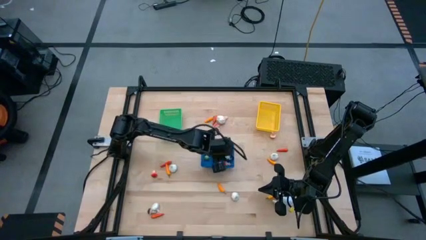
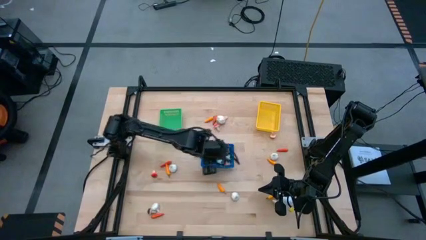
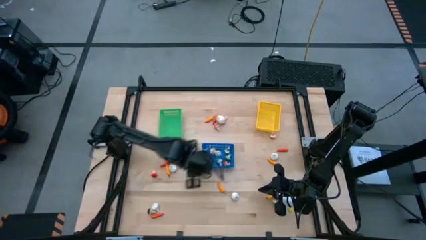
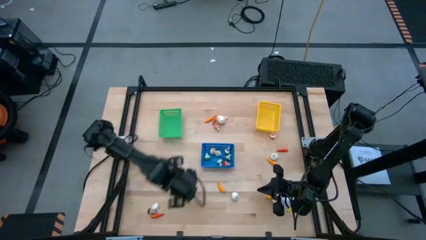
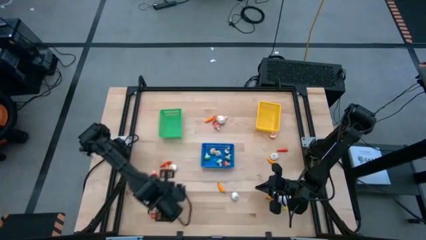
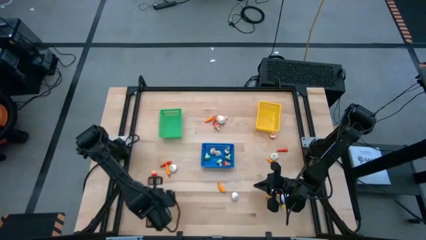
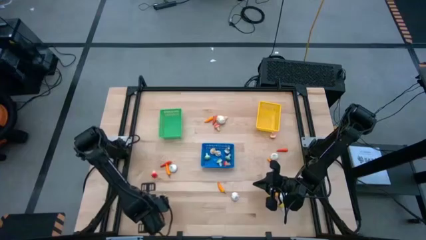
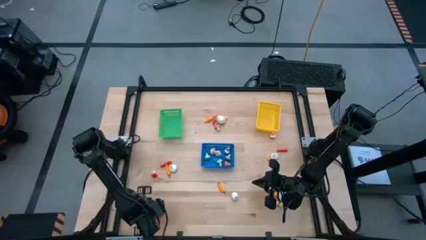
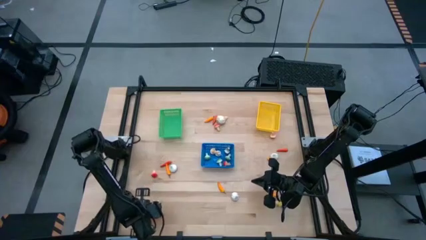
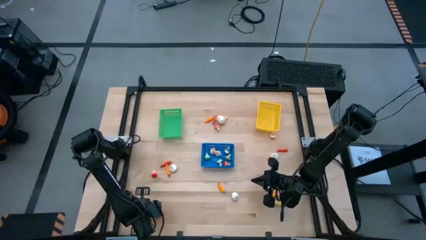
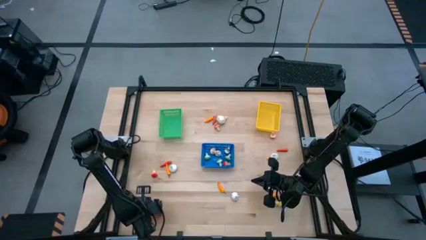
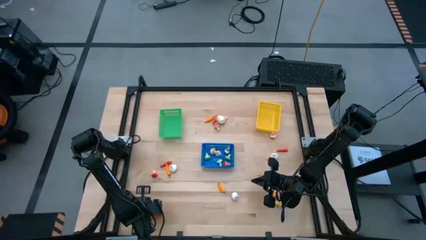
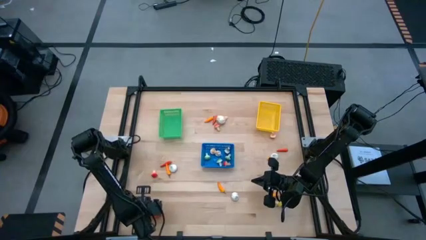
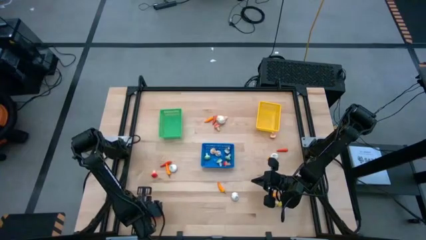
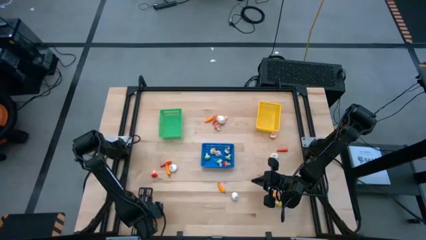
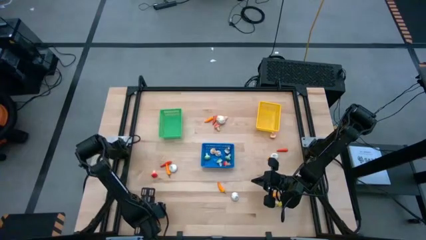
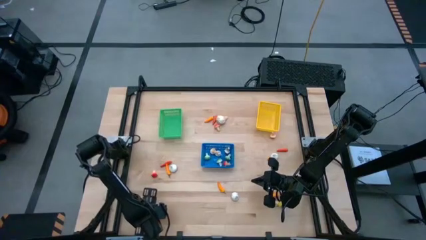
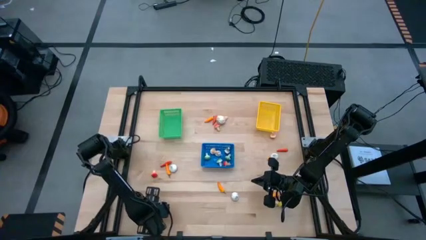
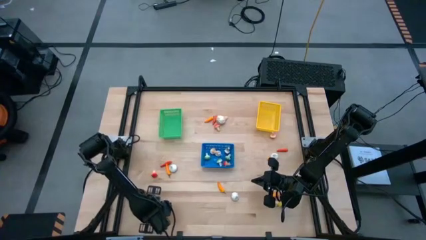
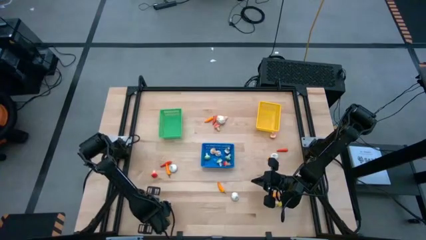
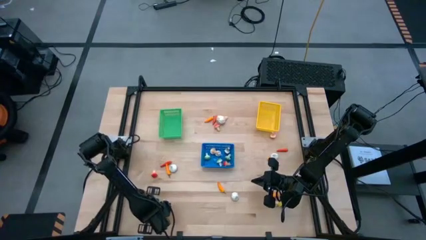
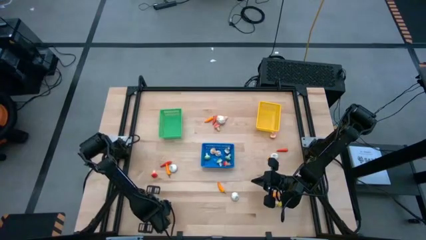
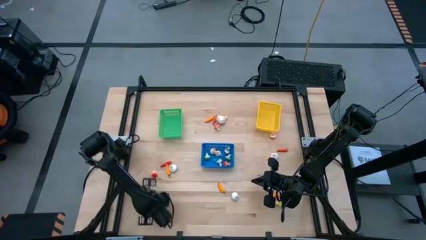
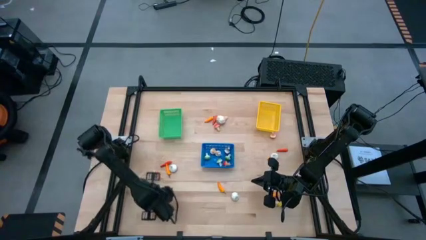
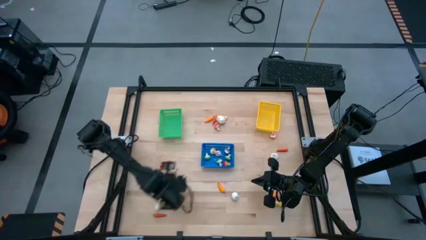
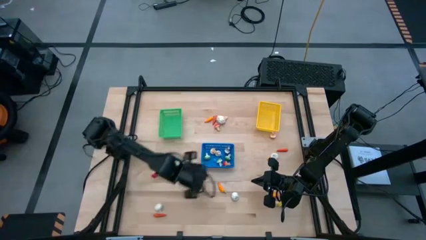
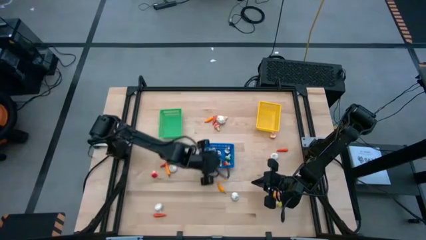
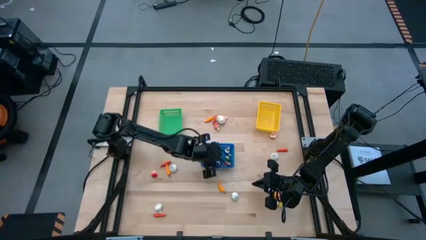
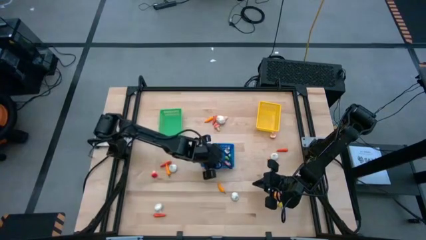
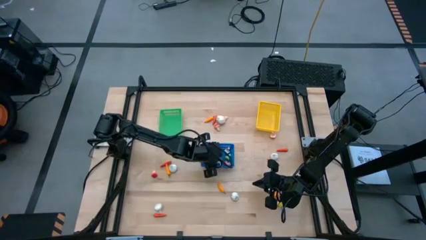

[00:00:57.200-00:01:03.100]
Task: Sort produce into baskets
Put the brown mushroom into the blue bin

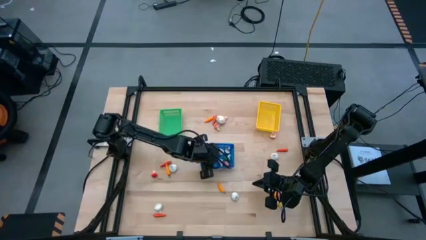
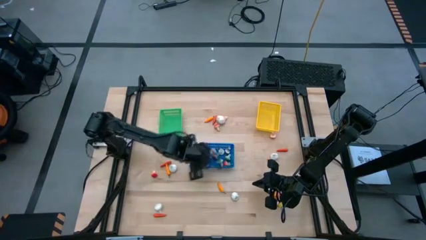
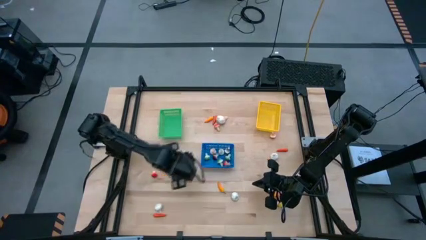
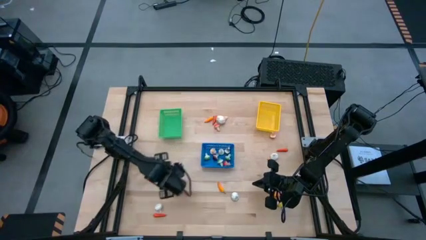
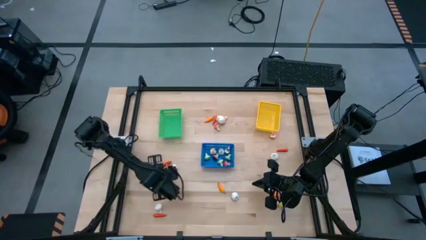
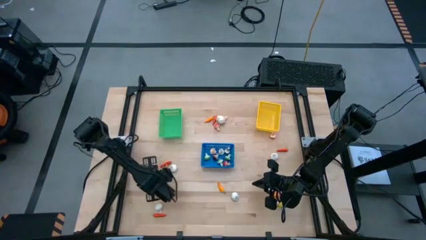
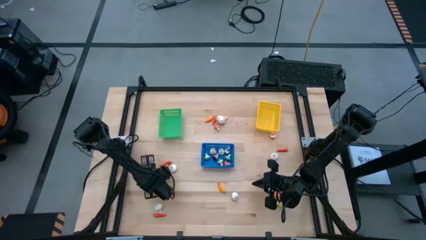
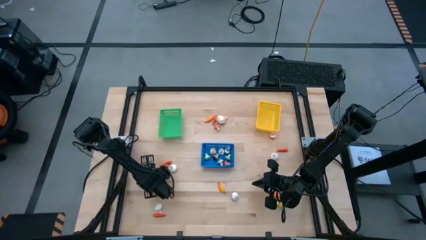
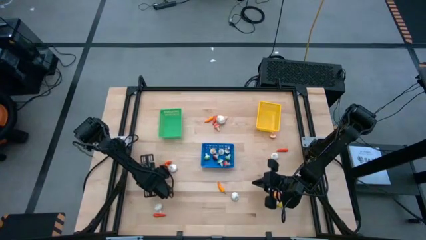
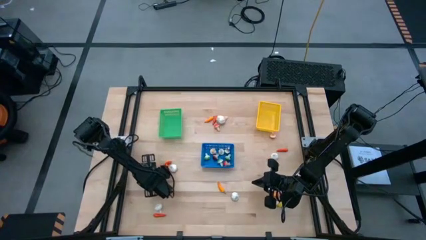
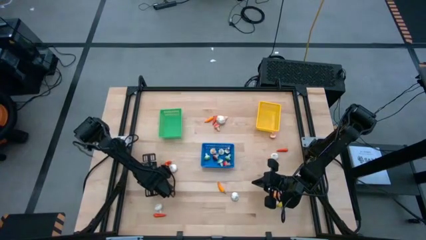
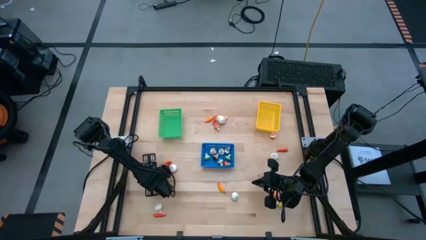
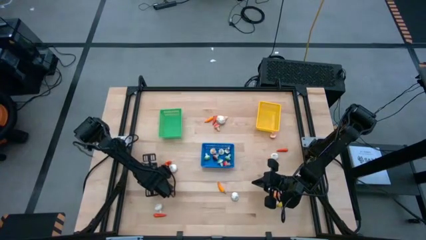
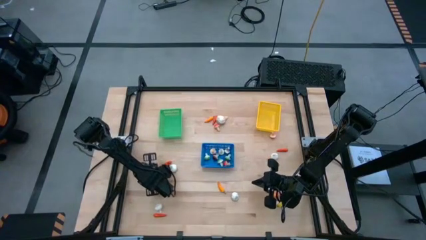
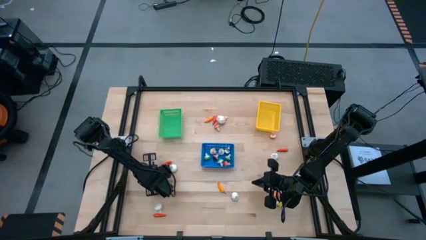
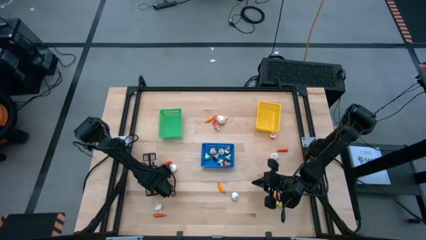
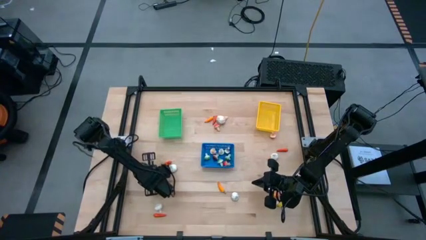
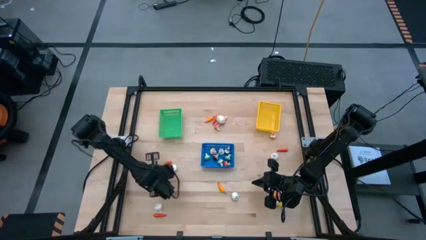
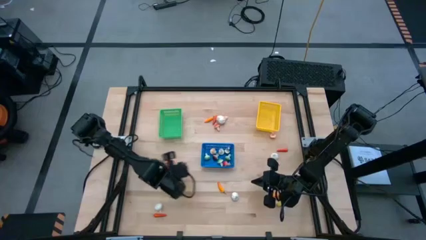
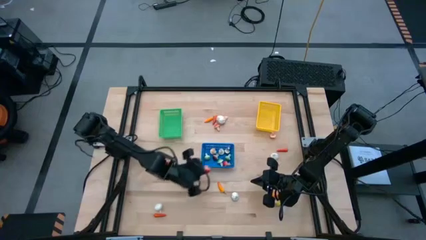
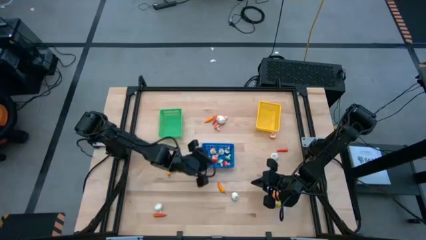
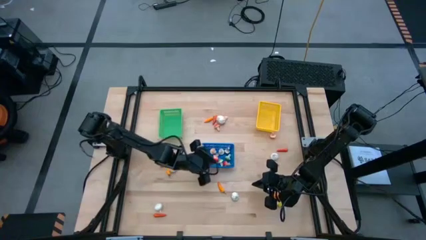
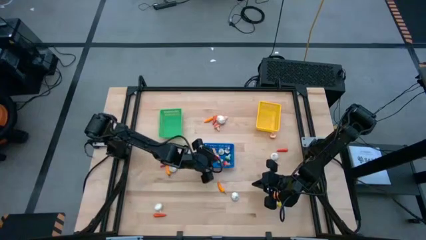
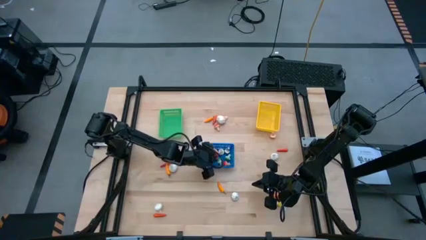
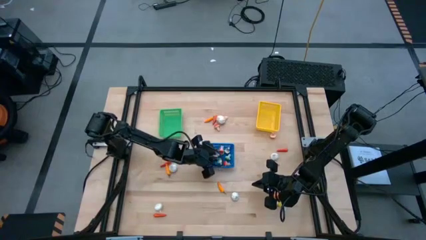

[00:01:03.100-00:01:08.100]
Put the orange mushroom into the blue bin

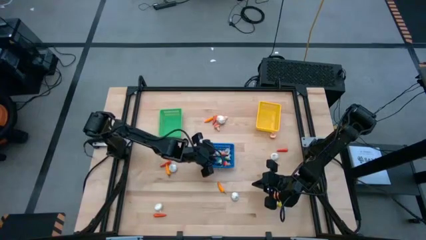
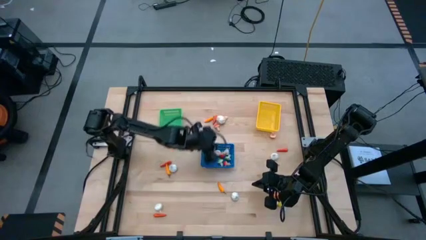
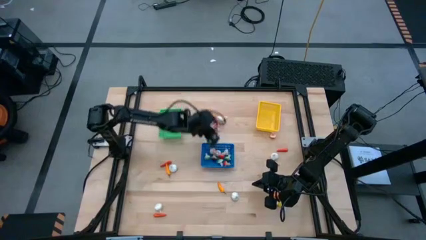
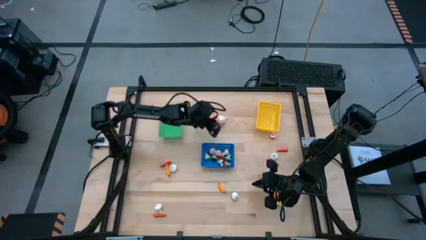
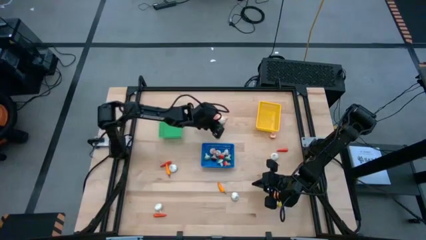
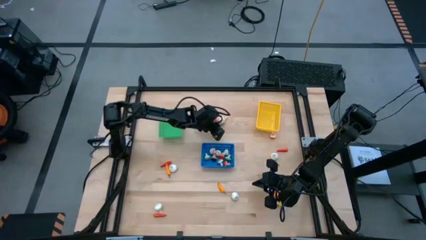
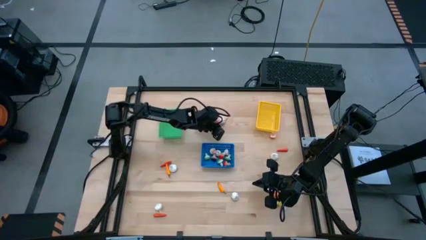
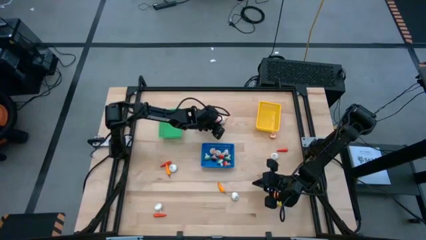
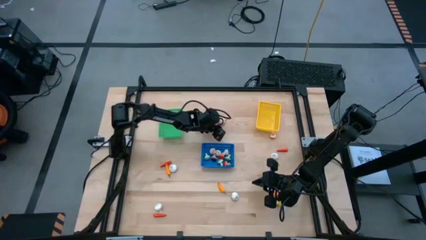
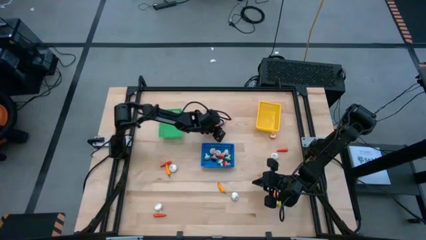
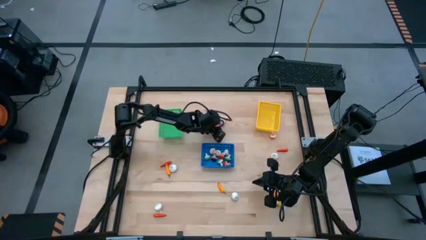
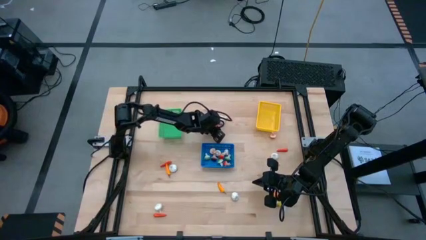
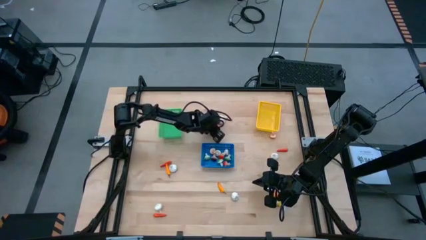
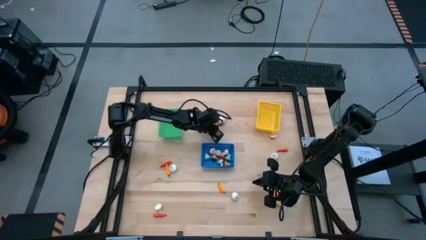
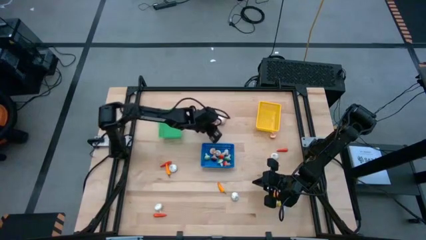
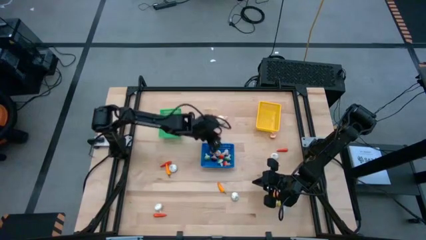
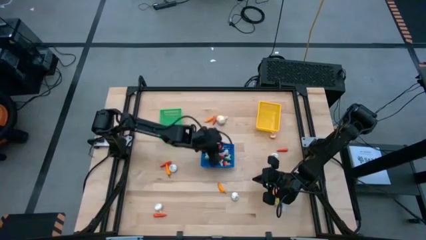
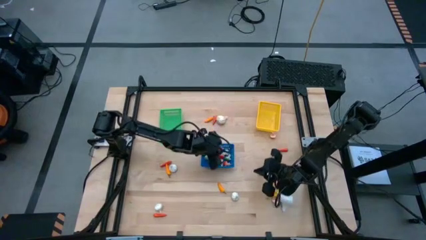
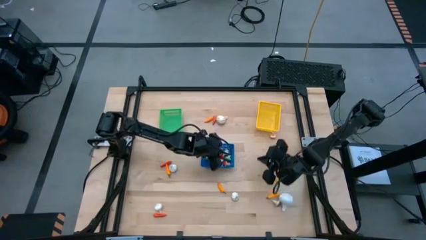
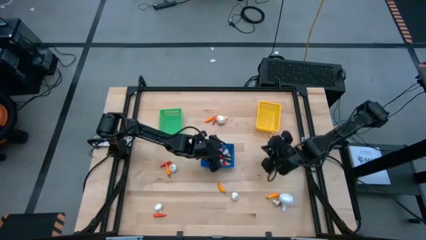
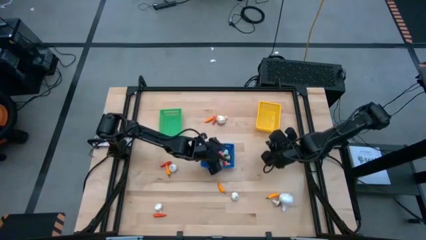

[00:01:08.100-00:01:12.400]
Put the orange mushroom into the blue bin

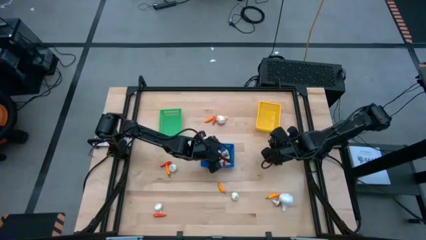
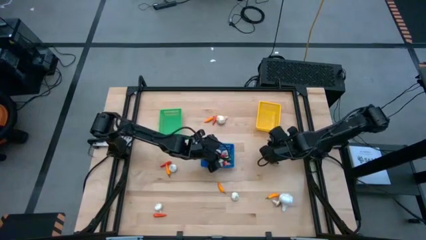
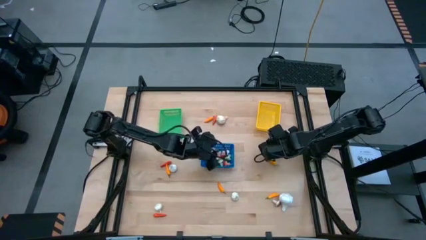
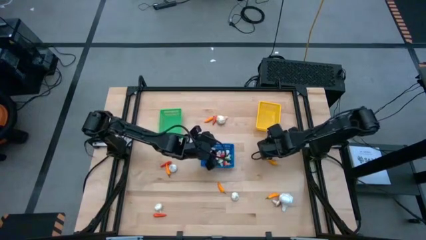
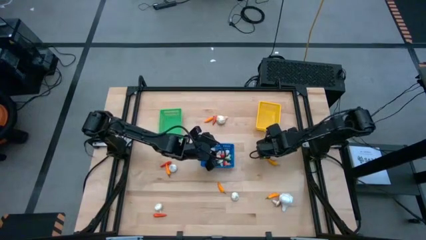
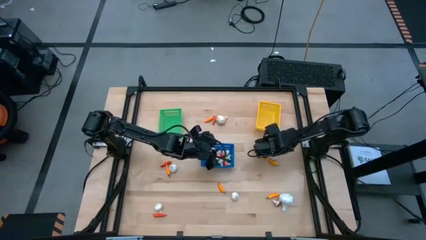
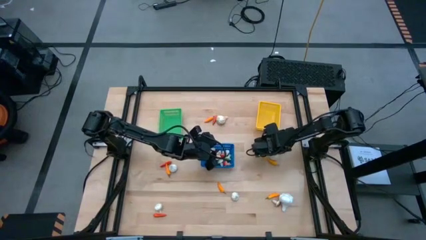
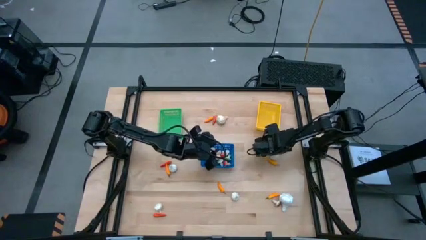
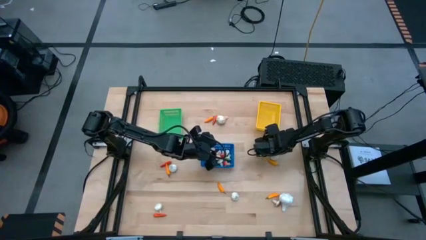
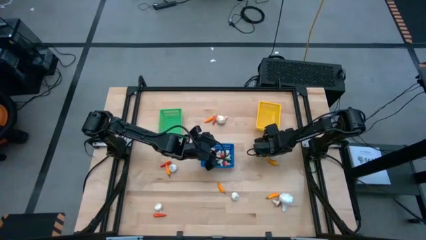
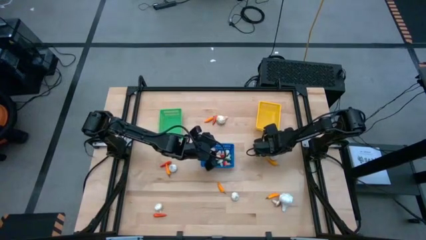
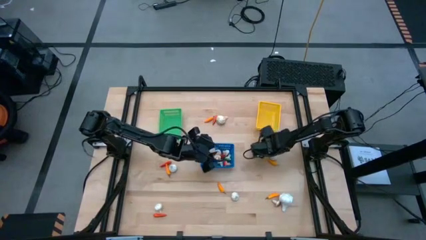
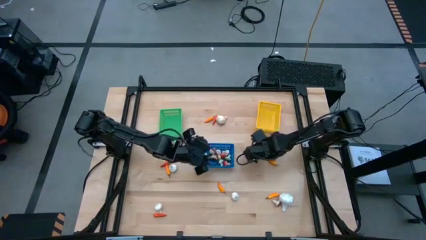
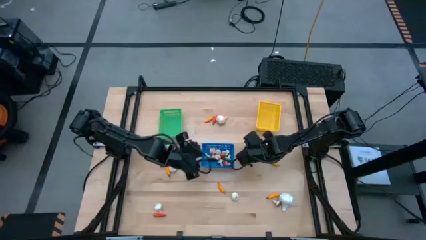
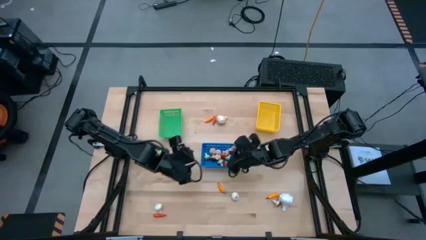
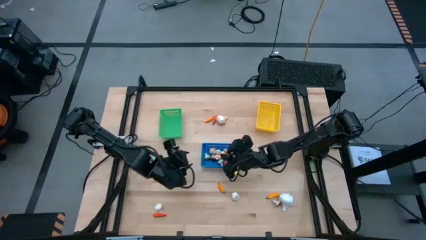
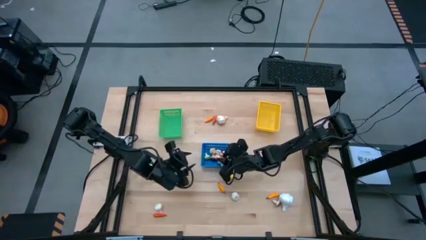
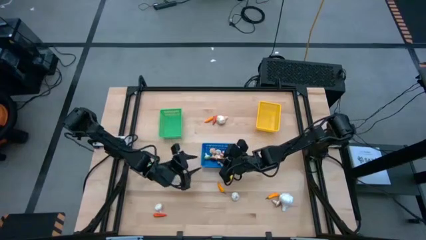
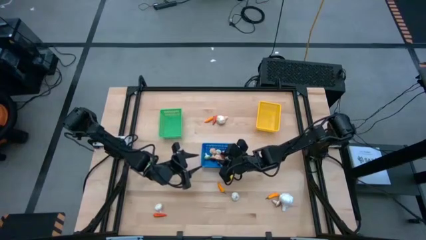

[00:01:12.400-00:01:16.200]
Put the orange mushroom into the blue bin
